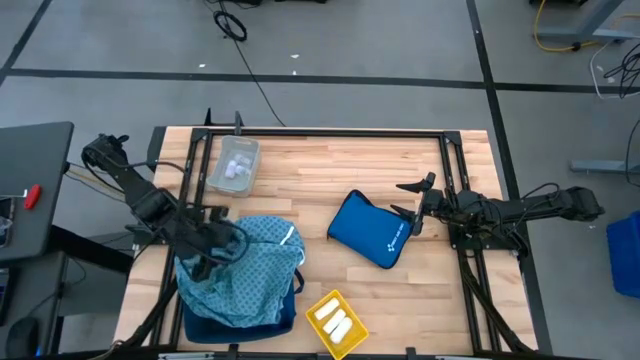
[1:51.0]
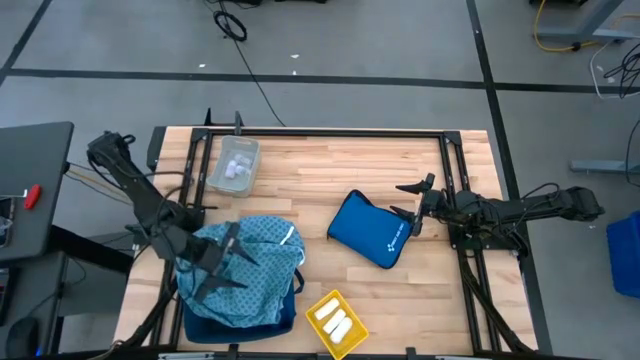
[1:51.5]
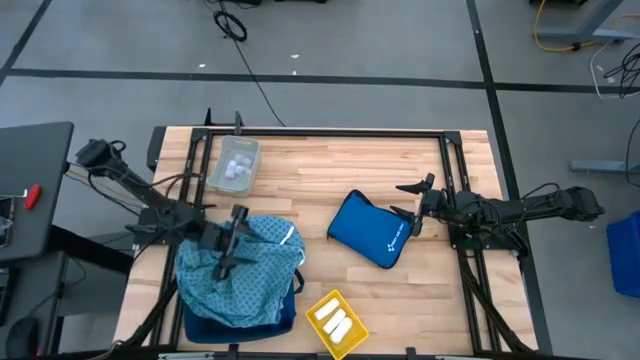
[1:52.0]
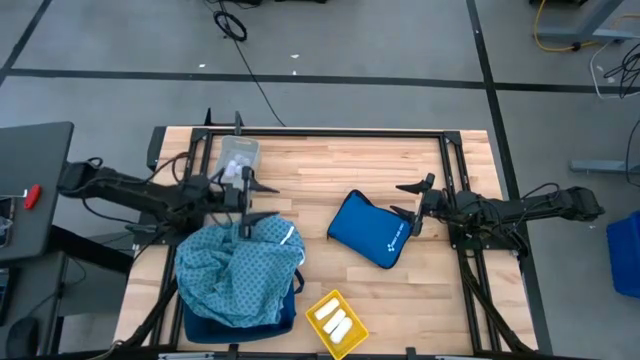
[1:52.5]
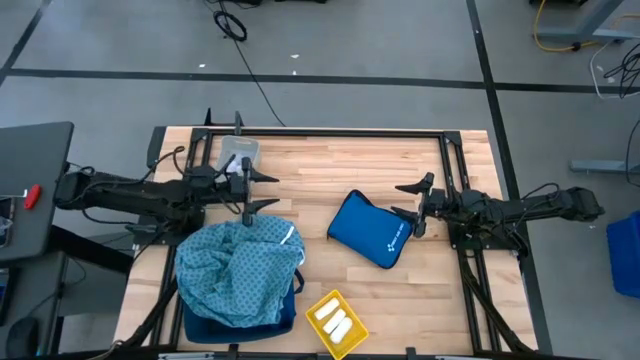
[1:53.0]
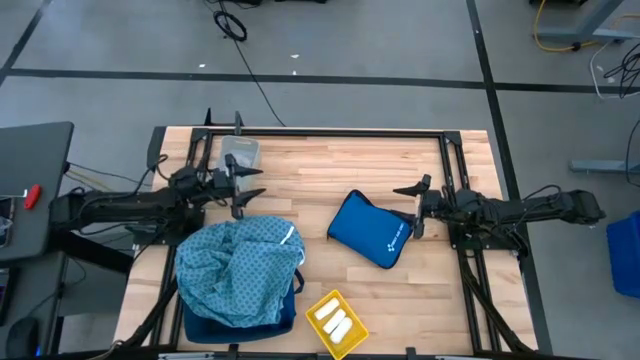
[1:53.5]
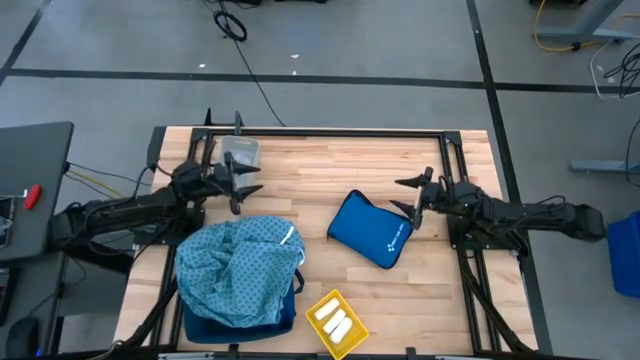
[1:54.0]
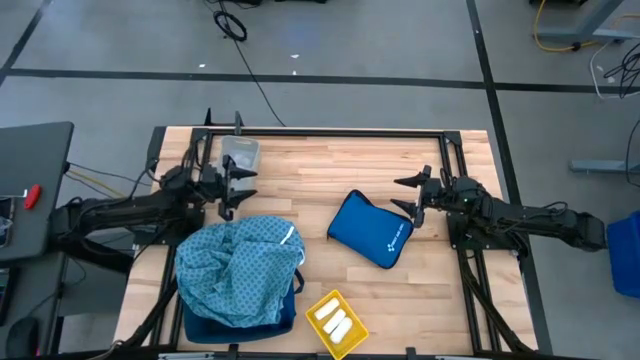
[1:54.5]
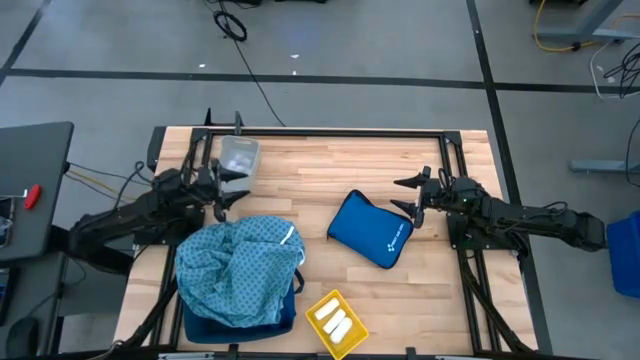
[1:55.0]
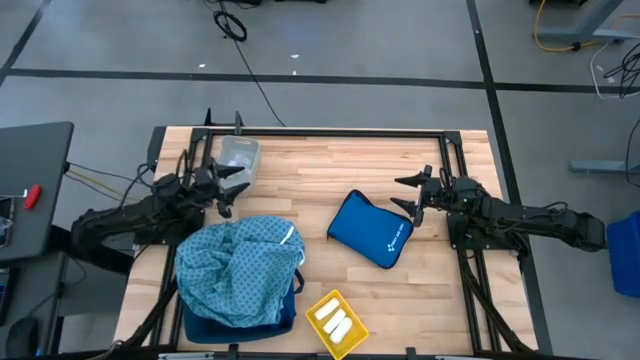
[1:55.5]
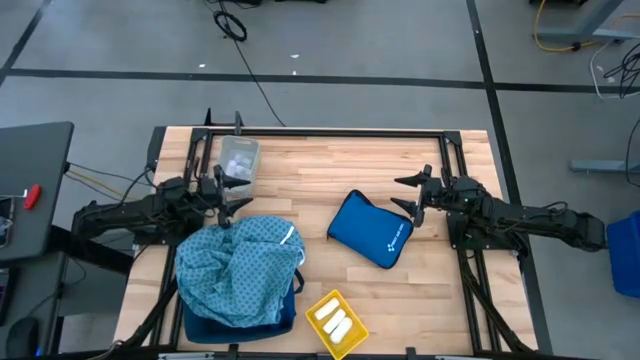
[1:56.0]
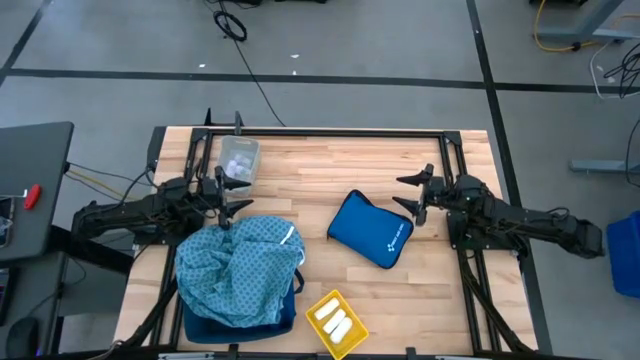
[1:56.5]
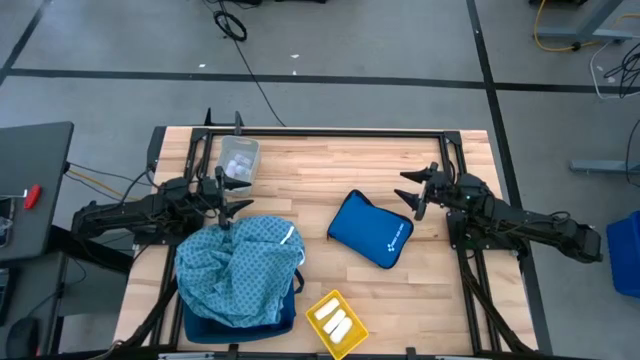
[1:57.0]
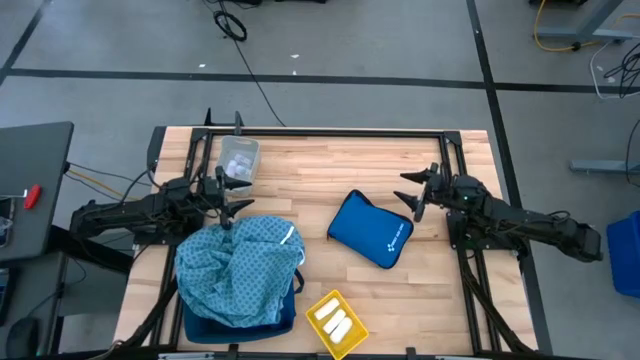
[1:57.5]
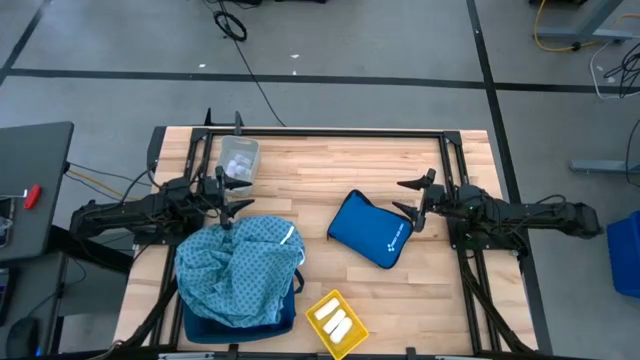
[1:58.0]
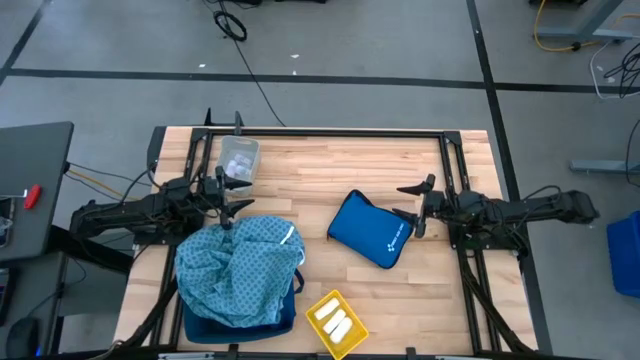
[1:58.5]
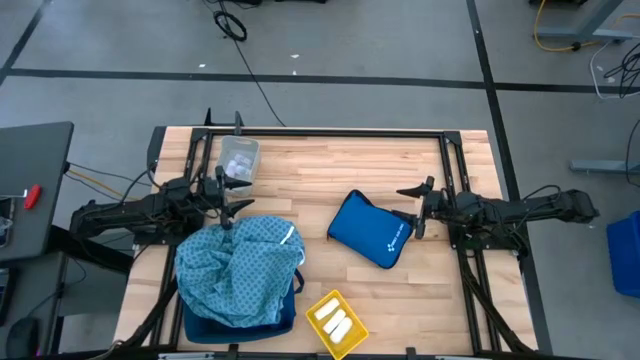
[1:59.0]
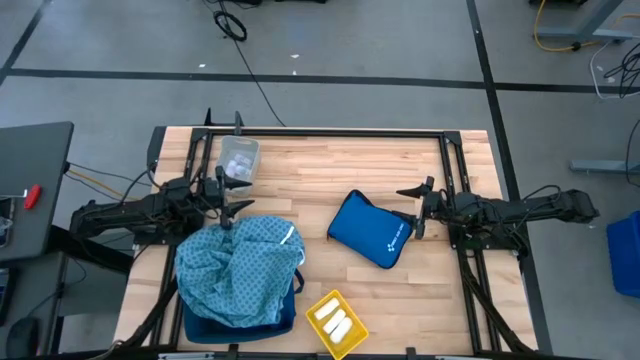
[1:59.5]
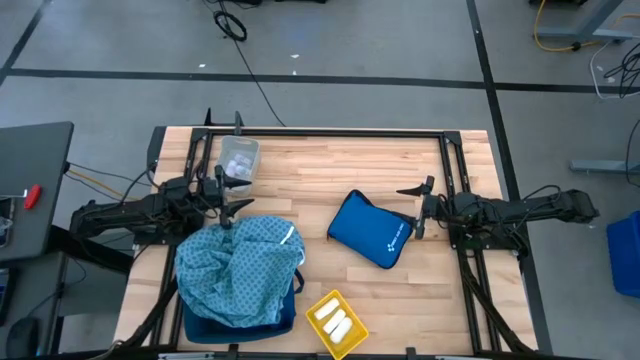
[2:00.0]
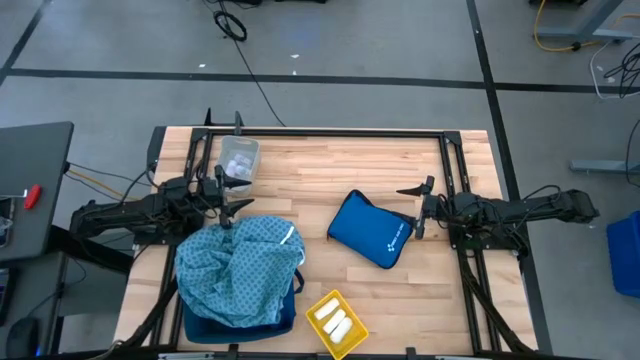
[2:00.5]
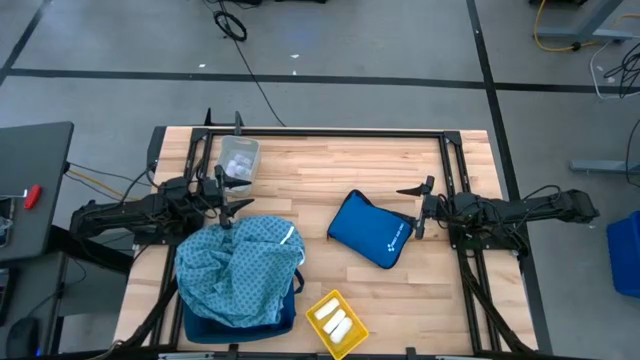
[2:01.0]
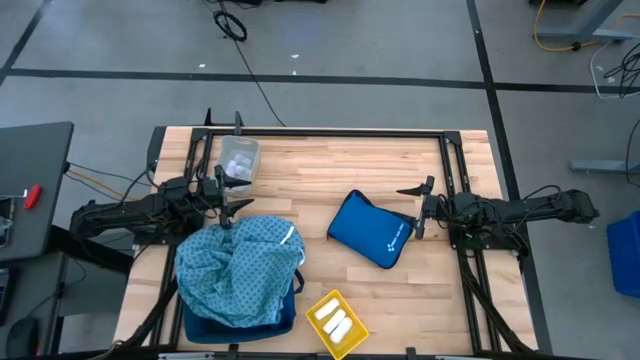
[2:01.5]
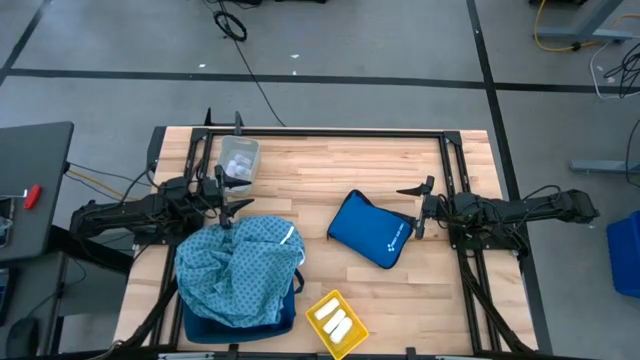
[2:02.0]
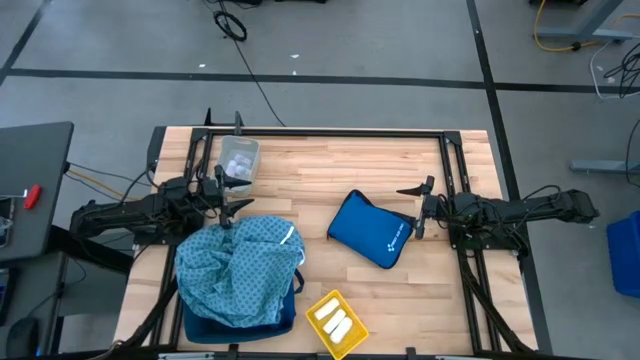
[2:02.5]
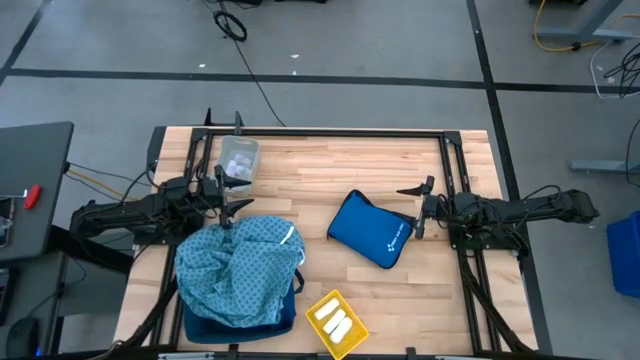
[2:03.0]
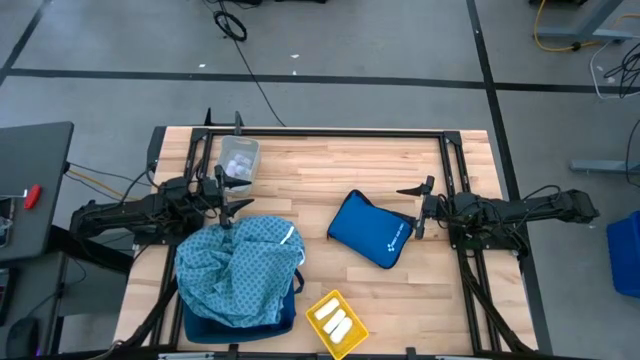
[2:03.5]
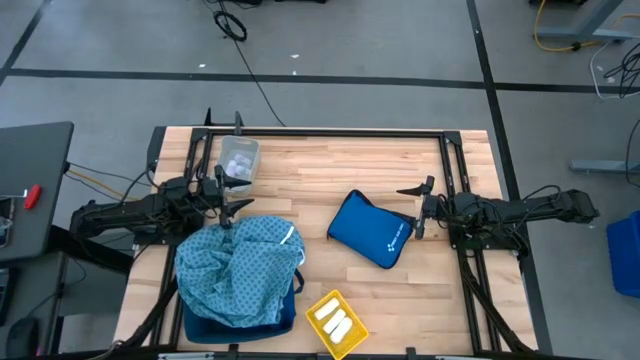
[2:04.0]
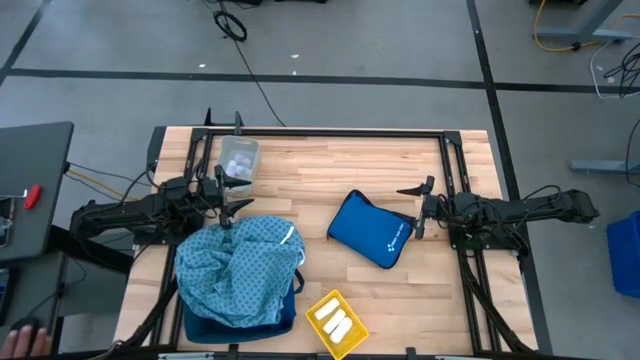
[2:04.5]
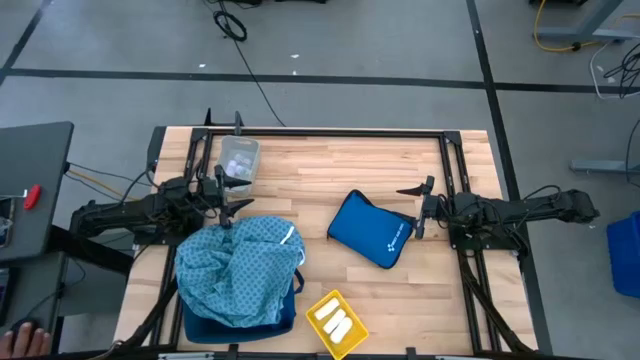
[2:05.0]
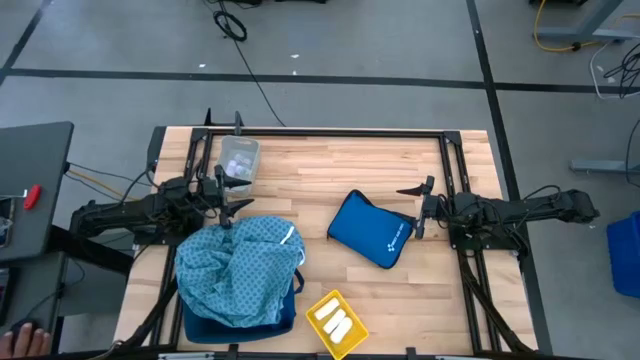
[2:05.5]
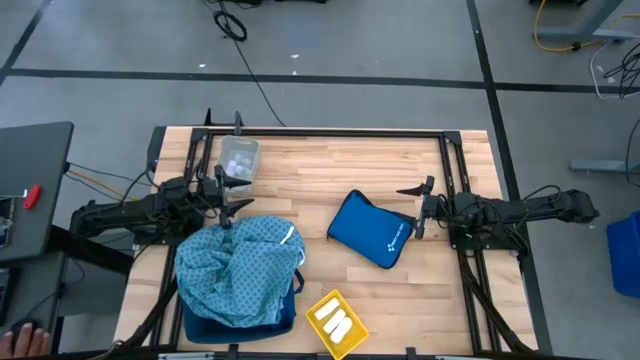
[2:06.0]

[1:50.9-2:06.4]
Task: Pick & place medical supplies in basket/bin
Return to Home Position

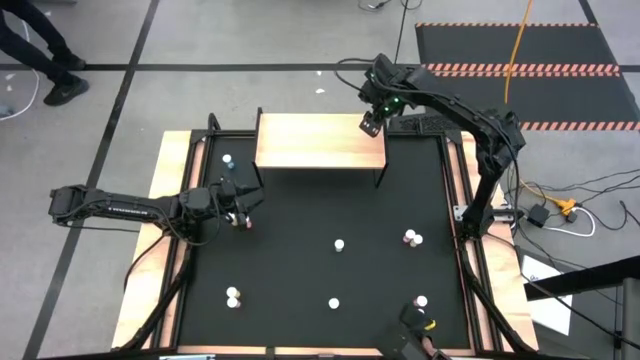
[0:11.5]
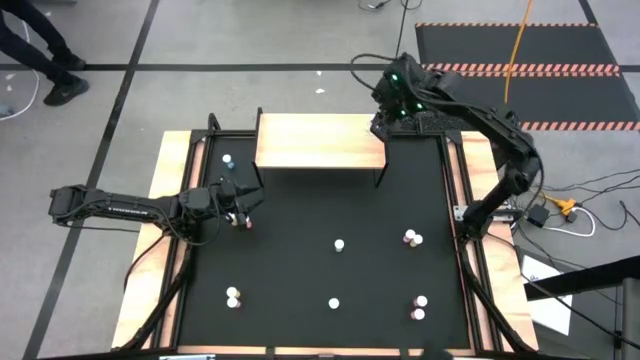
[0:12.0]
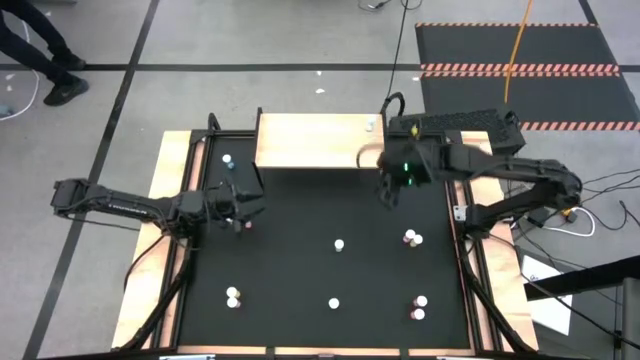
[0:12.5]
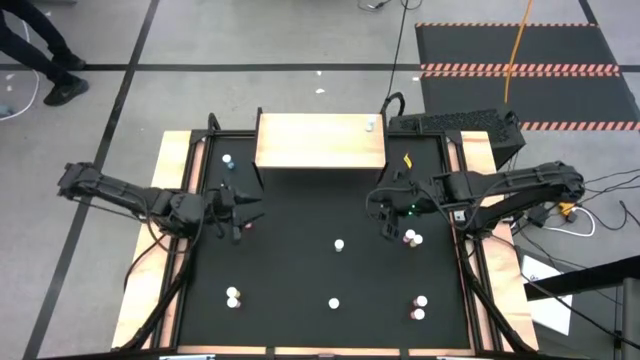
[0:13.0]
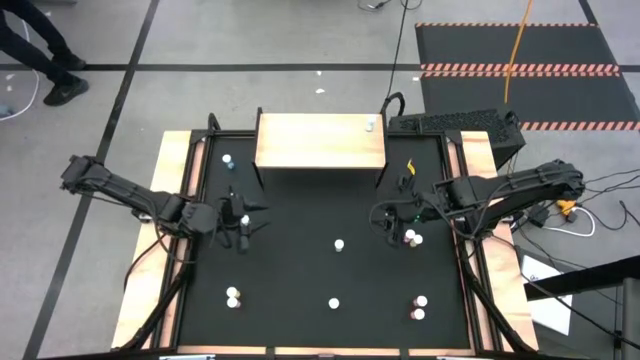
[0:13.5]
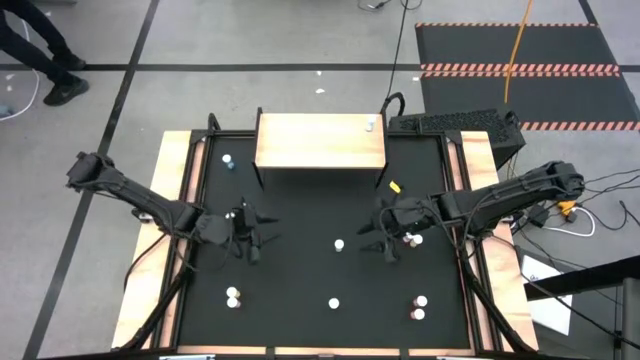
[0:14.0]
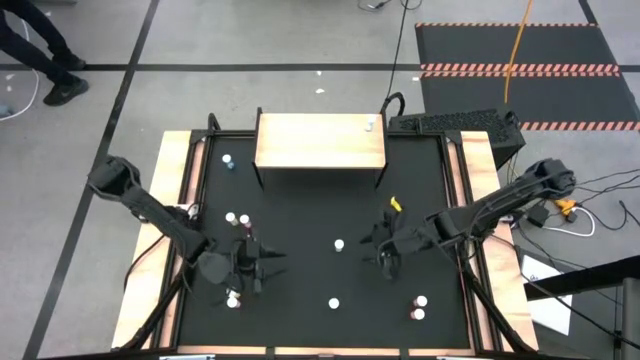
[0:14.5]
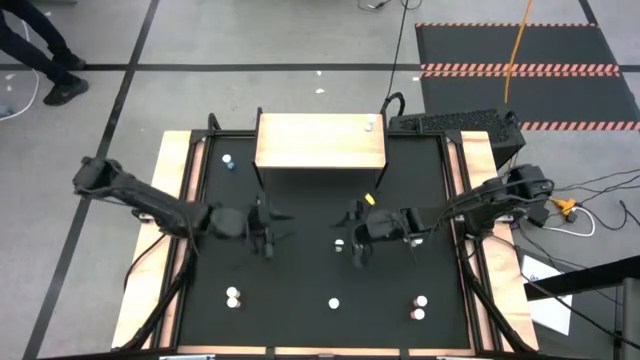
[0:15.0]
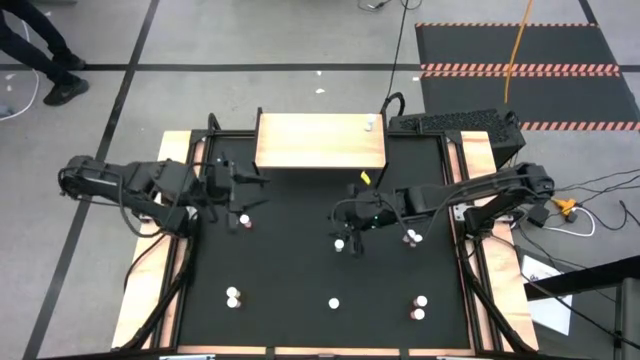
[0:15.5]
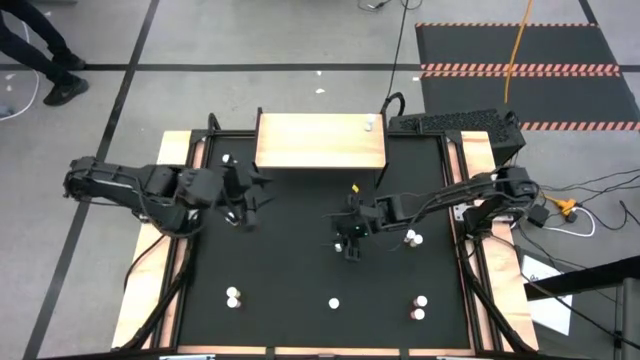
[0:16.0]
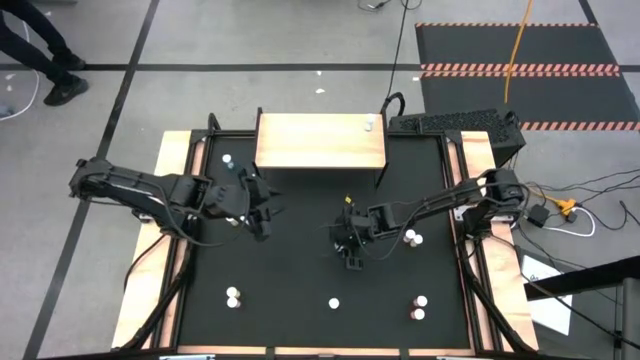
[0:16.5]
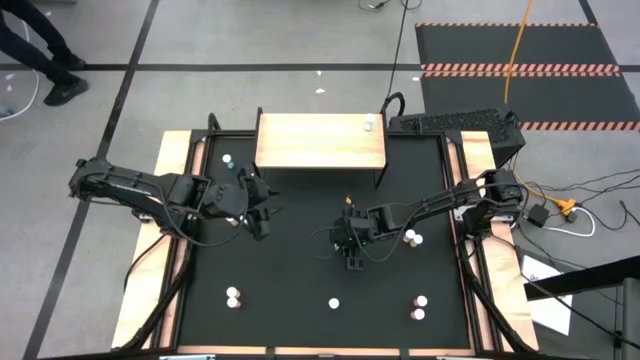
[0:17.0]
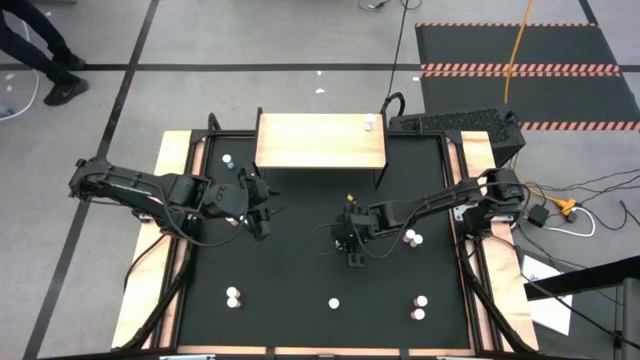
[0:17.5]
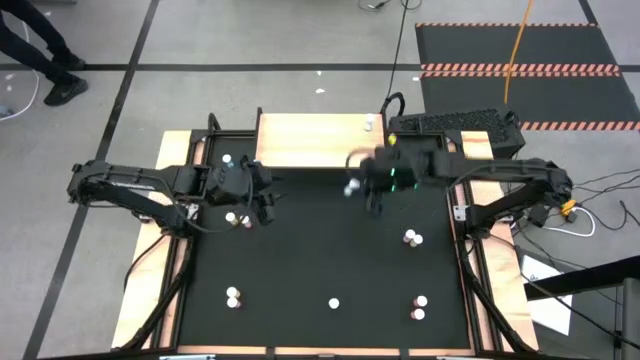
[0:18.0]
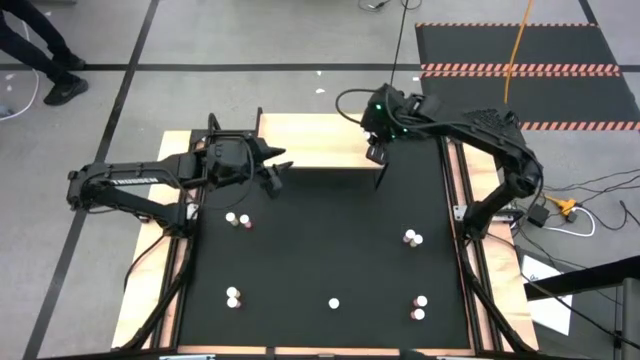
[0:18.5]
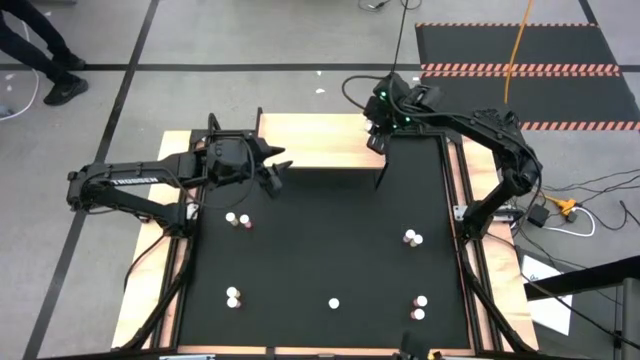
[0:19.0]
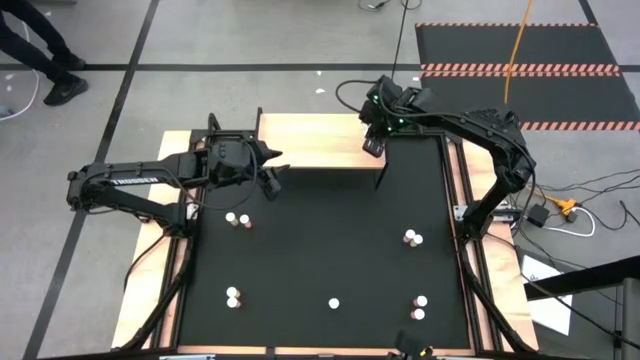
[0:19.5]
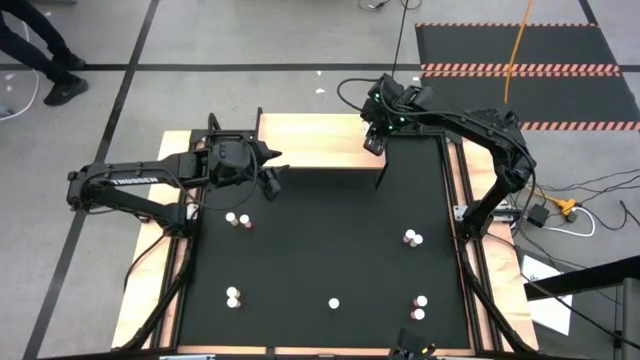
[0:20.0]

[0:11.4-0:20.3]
Task: Pick and place medicine bottles onto shelf by color
Put the right blue pill bottle on the shelf aligned with the other blue pill bottle
